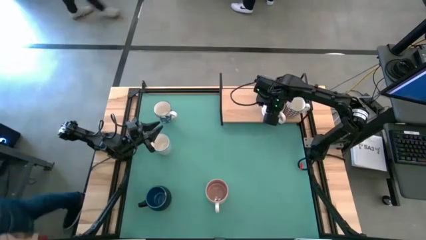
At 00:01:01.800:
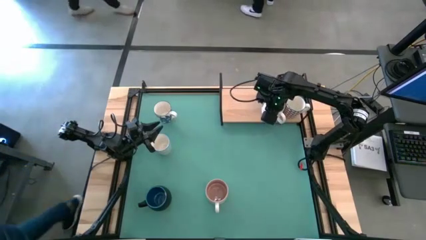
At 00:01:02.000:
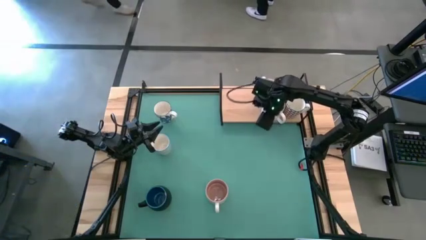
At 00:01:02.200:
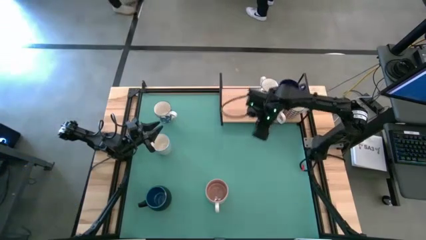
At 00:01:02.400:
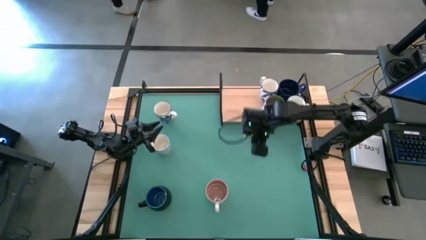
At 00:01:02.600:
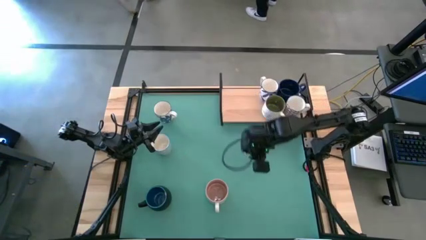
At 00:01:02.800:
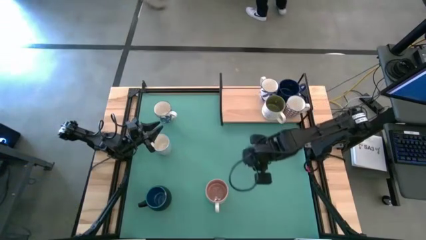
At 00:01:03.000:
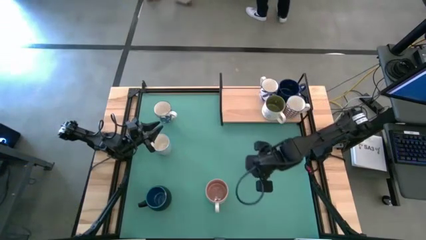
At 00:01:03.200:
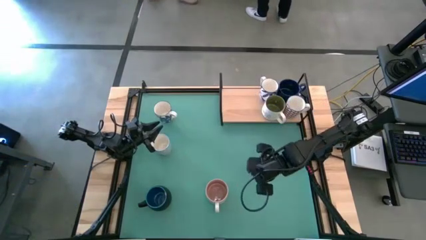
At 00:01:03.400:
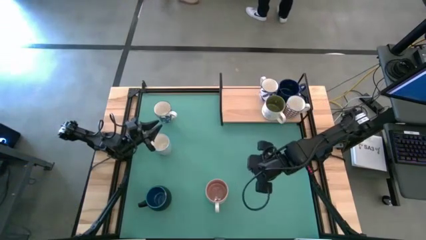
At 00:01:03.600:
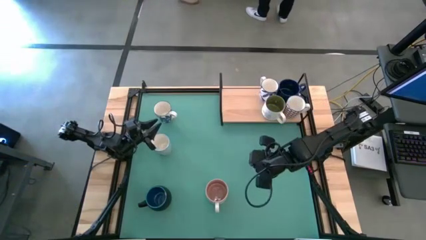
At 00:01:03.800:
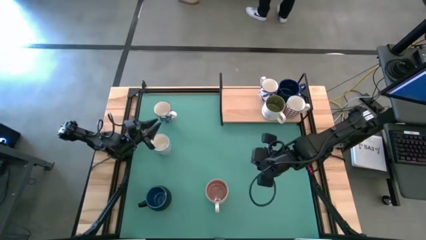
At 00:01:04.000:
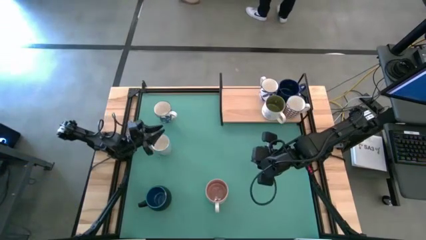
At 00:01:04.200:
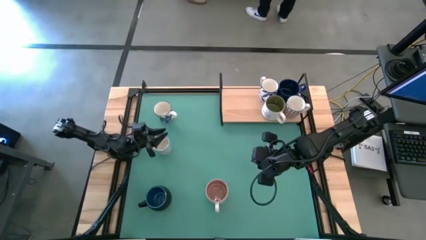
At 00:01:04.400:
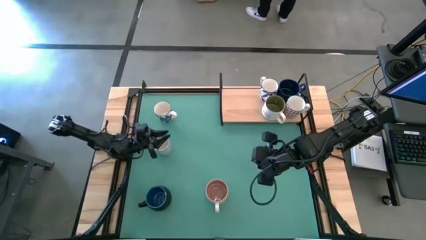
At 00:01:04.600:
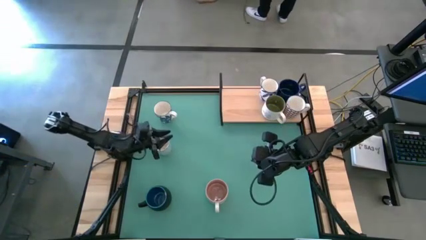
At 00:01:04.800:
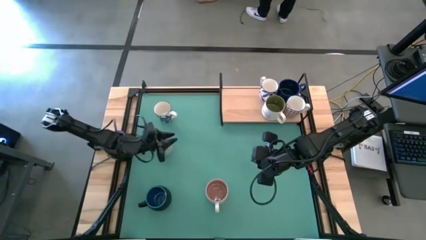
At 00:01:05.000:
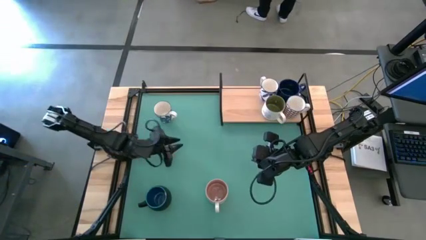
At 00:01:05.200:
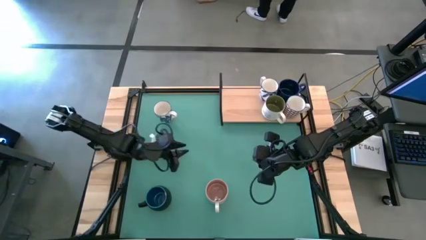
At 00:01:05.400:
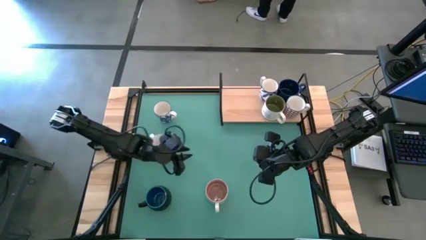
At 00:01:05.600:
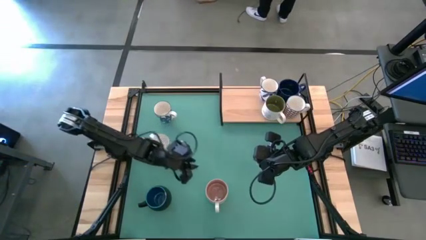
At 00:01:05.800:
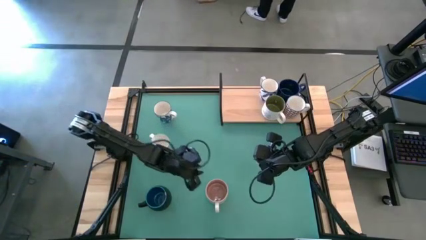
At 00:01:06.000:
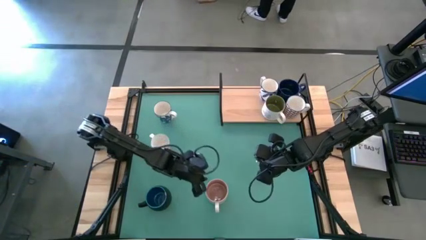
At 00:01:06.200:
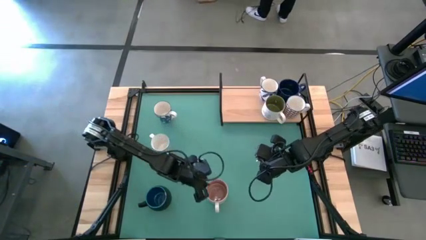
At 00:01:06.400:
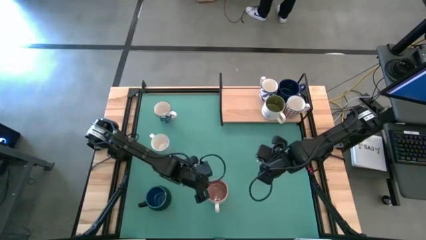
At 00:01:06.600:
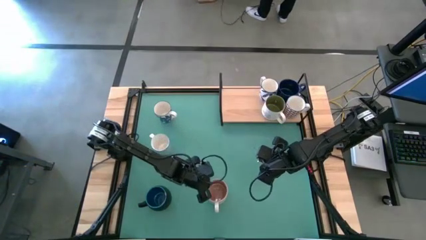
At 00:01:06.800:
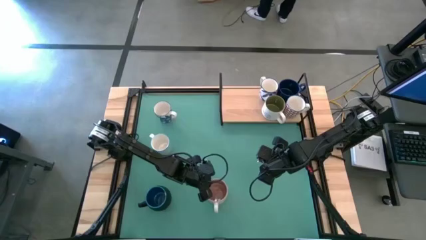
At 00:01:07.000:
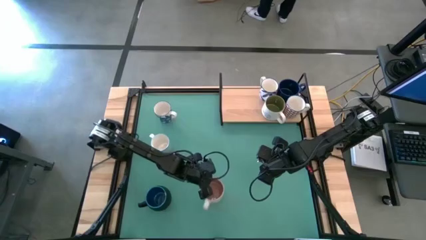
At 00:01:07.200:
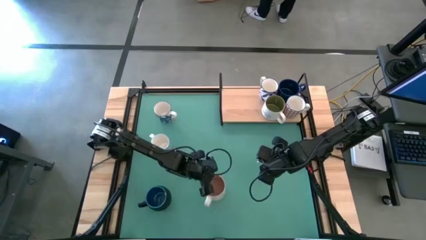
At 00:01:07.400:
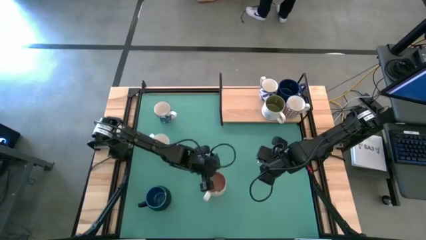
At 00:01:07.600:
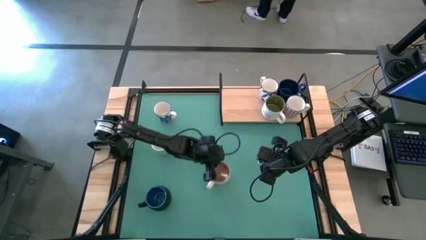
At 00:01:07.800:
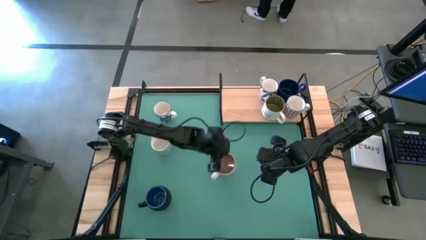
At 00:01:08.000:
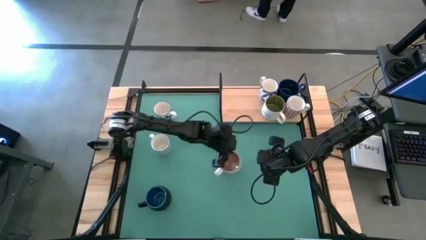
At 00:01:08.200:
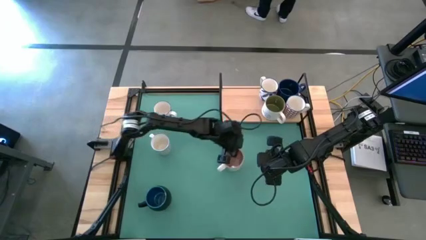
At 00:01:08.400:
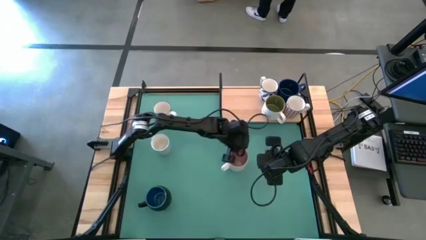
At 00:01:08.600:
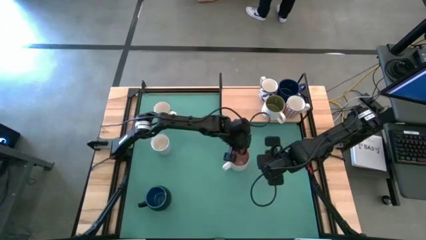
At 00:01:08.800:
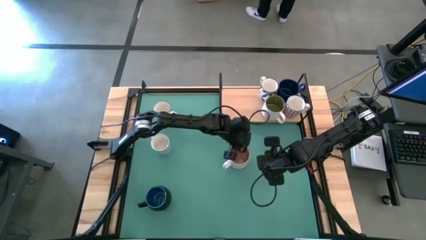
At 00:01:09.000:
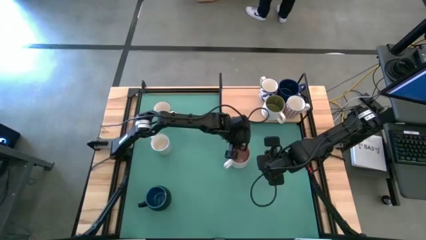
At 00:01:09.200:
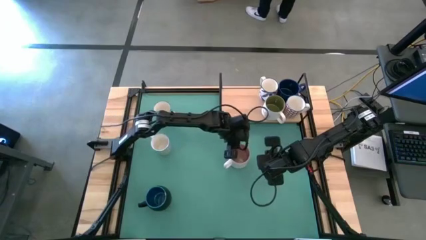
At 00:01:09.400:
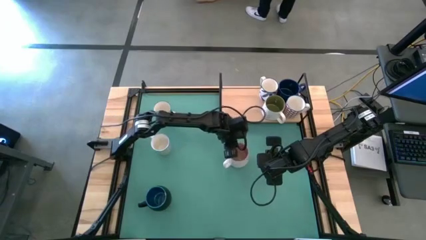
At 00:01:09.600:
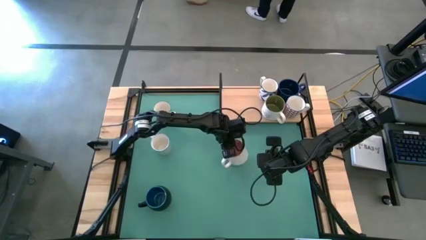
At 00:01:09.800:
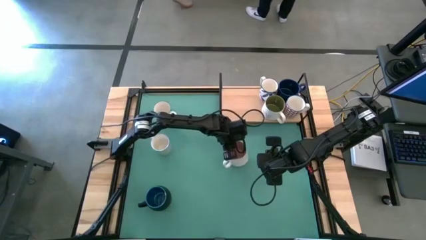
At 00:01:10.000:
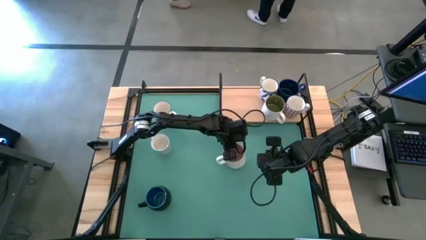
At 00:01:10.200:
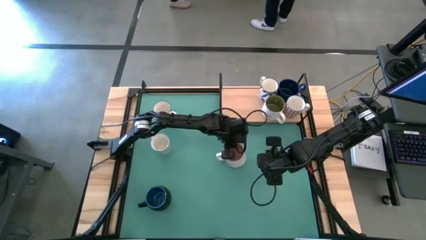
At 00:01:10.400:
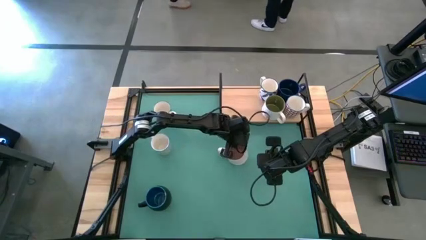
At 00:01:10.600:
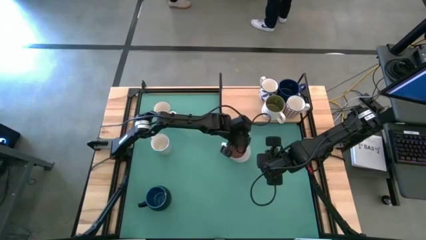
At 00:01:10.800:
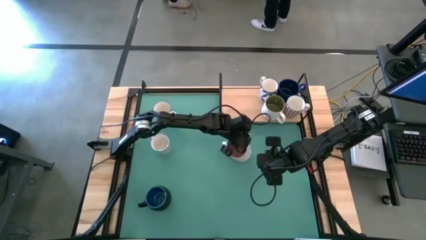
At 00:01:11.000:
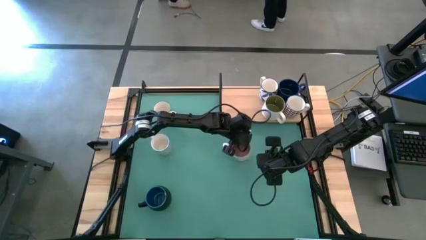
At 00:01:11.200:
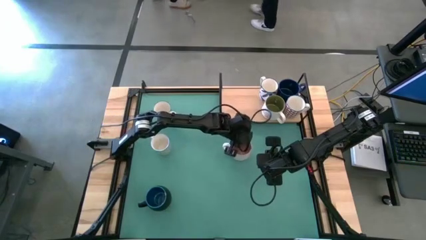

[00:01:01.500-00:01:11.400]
Task: Place coffee mugs
Put the pink white mug on the shelf
